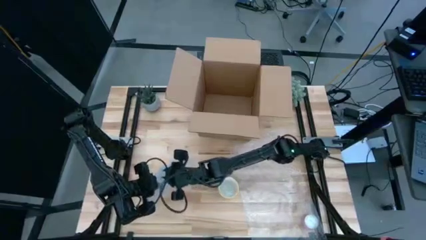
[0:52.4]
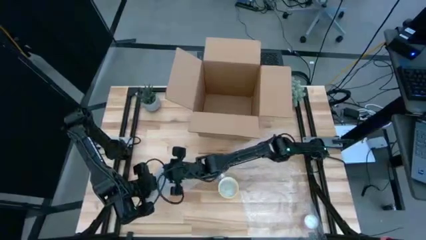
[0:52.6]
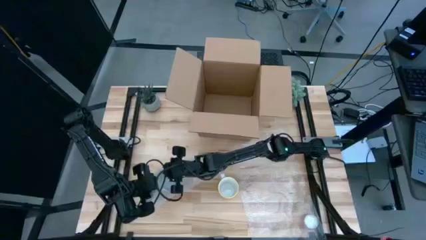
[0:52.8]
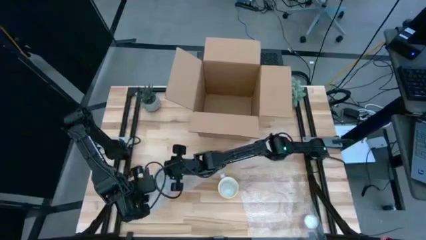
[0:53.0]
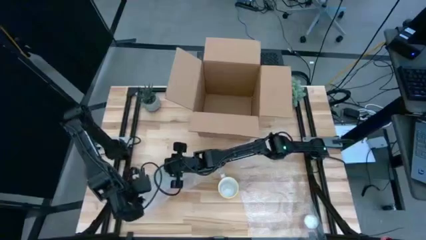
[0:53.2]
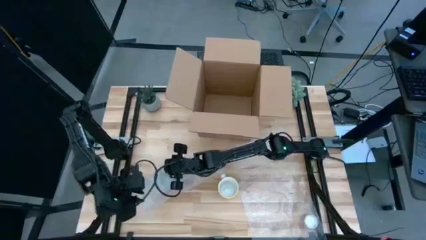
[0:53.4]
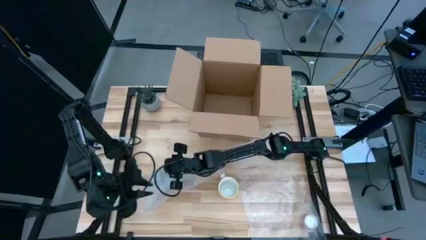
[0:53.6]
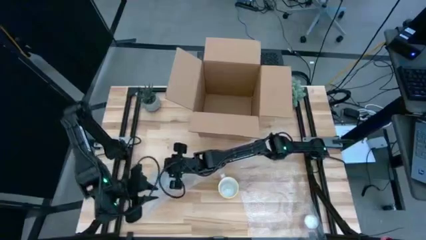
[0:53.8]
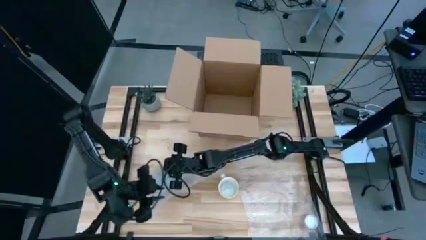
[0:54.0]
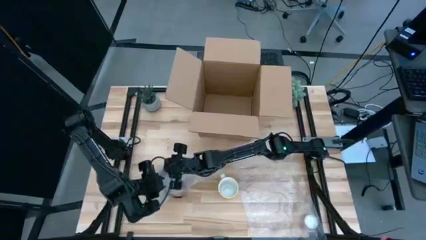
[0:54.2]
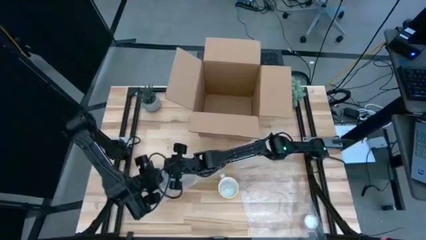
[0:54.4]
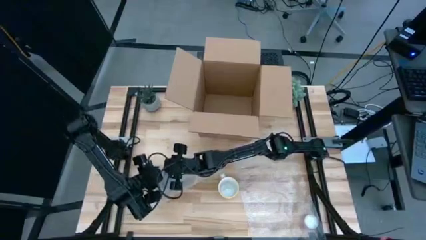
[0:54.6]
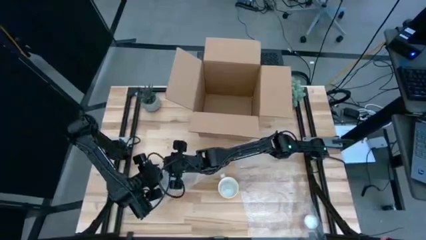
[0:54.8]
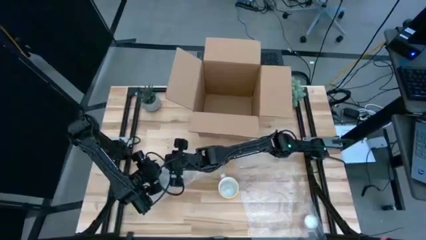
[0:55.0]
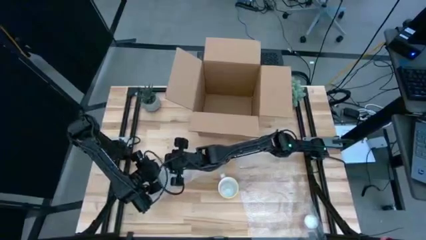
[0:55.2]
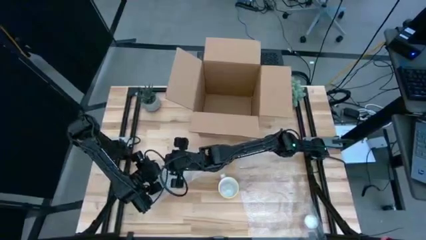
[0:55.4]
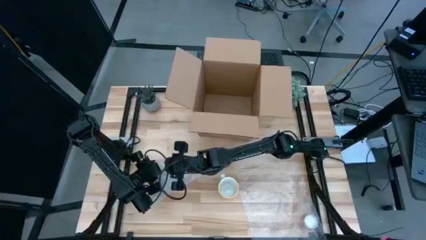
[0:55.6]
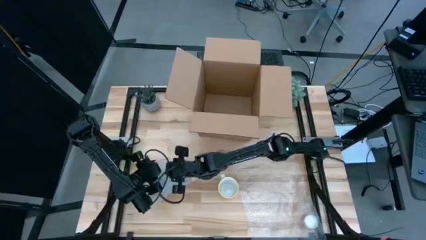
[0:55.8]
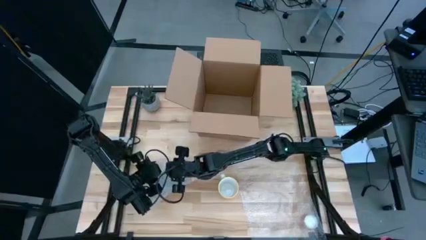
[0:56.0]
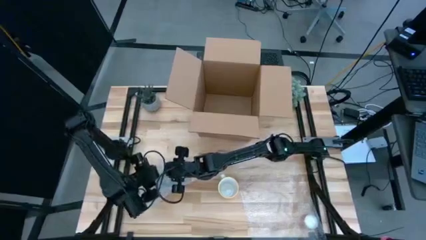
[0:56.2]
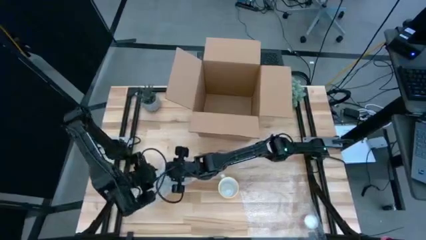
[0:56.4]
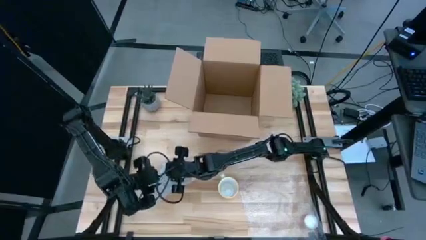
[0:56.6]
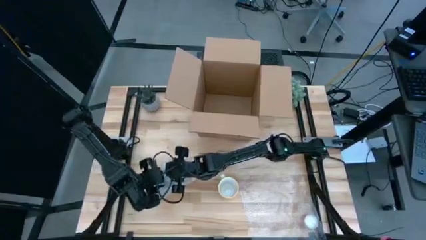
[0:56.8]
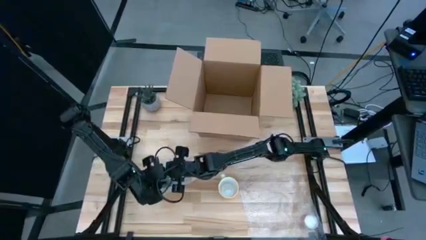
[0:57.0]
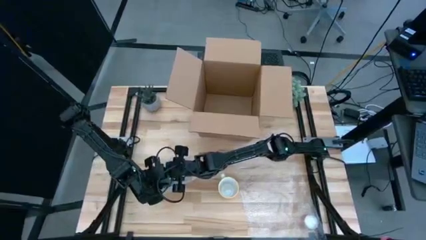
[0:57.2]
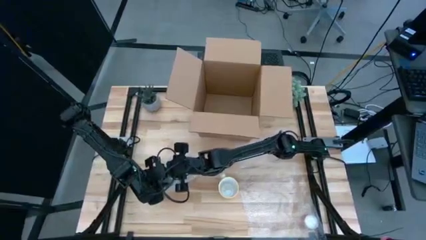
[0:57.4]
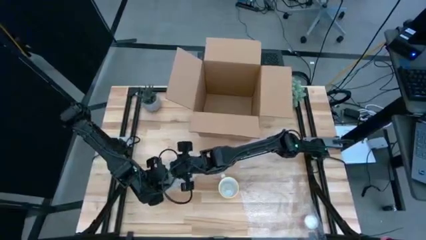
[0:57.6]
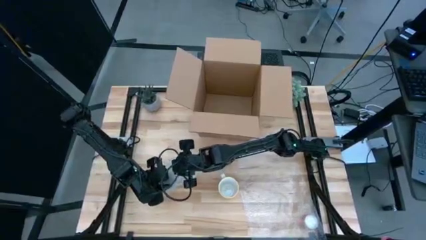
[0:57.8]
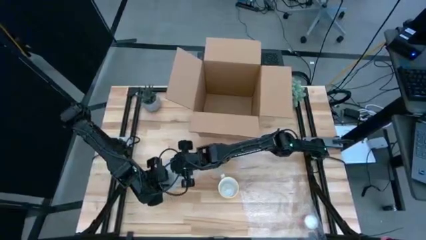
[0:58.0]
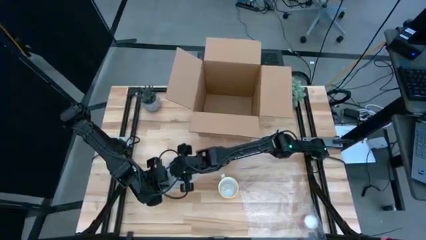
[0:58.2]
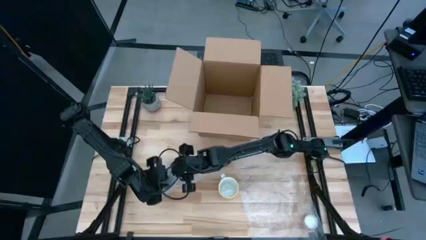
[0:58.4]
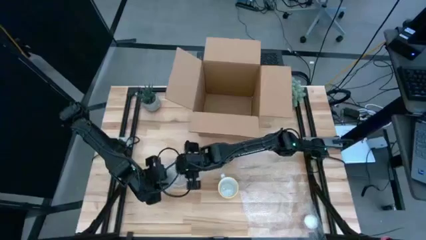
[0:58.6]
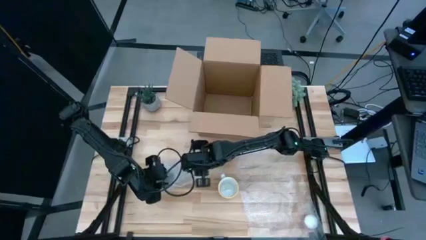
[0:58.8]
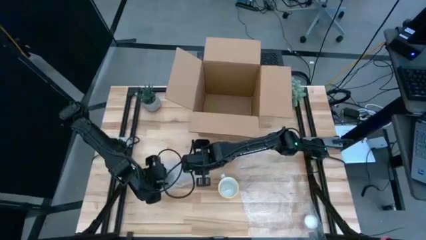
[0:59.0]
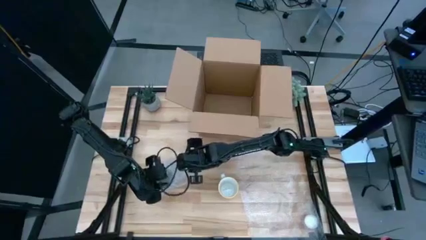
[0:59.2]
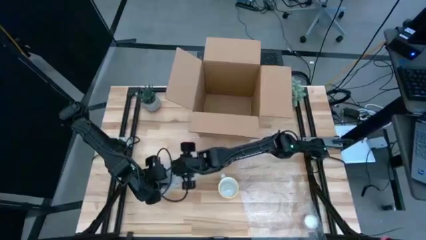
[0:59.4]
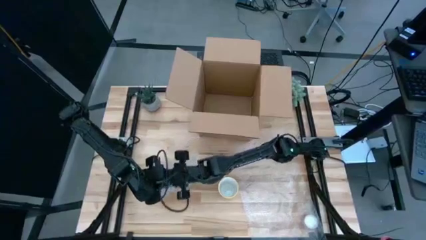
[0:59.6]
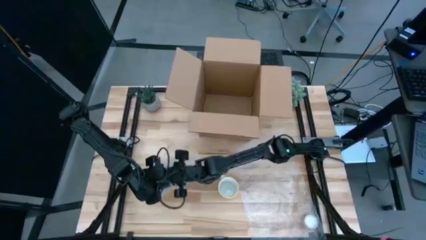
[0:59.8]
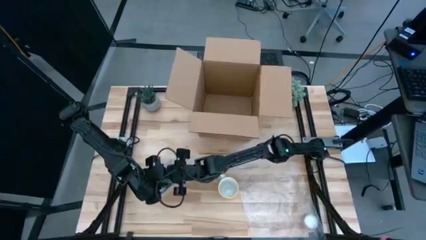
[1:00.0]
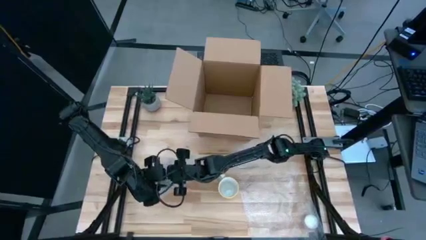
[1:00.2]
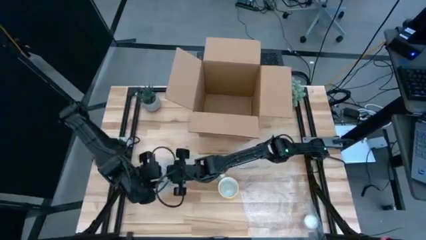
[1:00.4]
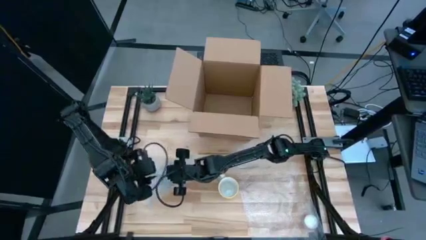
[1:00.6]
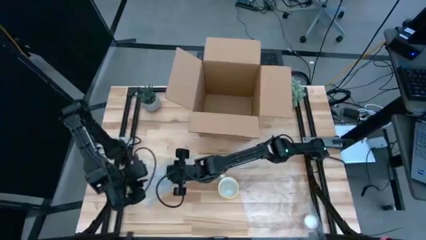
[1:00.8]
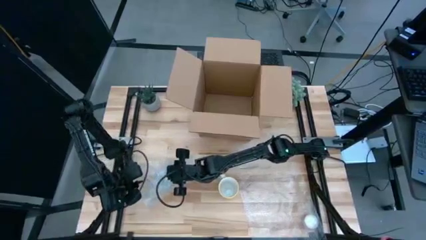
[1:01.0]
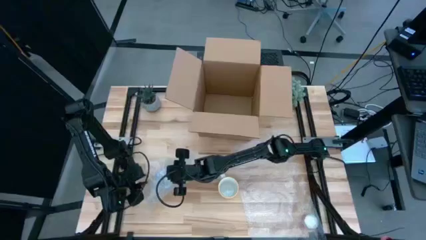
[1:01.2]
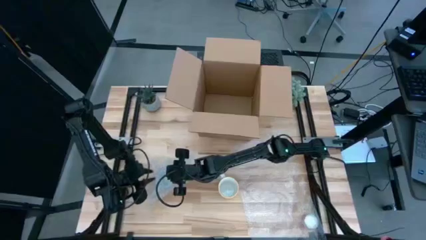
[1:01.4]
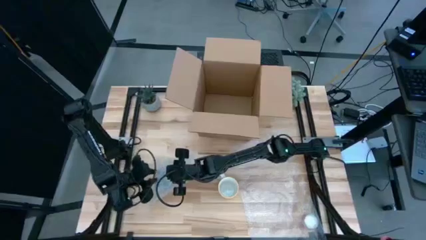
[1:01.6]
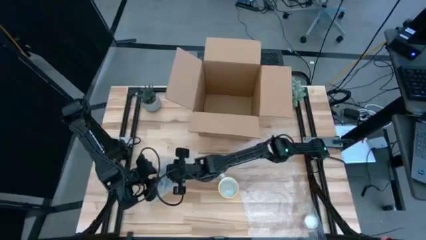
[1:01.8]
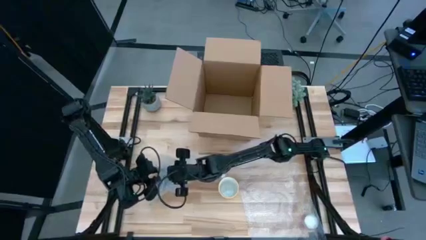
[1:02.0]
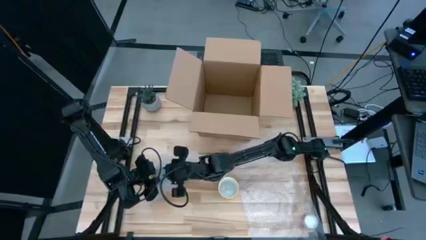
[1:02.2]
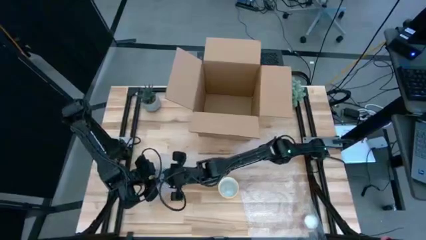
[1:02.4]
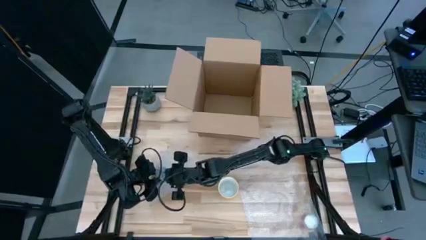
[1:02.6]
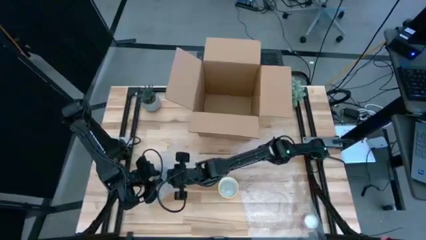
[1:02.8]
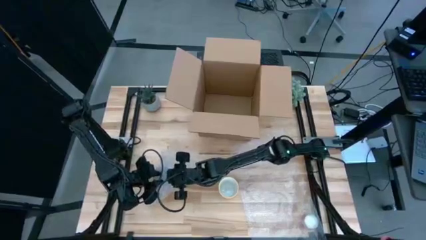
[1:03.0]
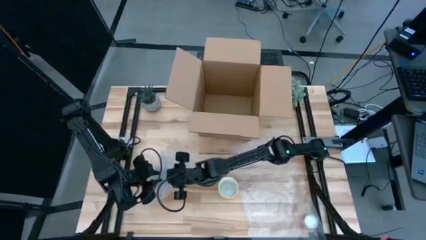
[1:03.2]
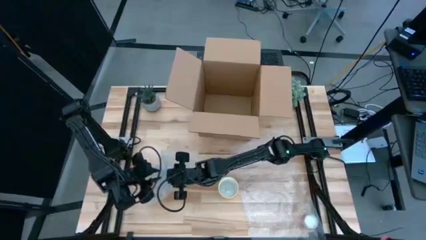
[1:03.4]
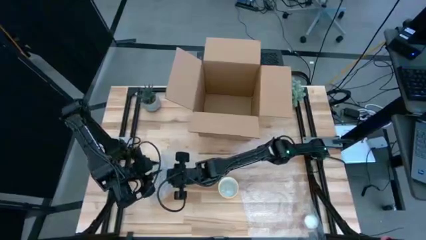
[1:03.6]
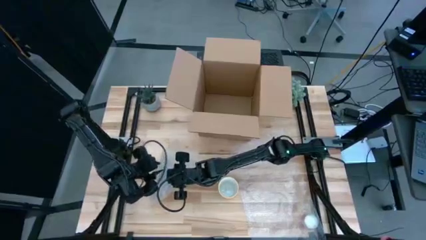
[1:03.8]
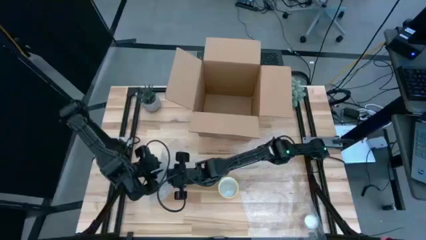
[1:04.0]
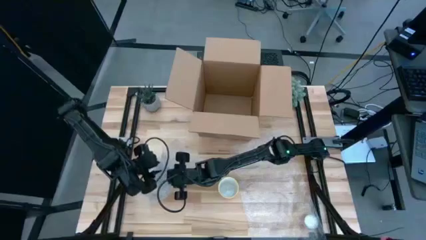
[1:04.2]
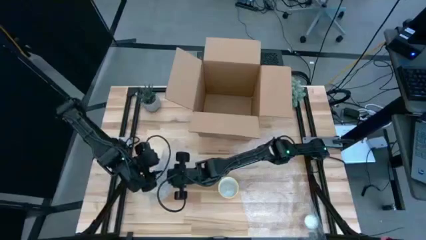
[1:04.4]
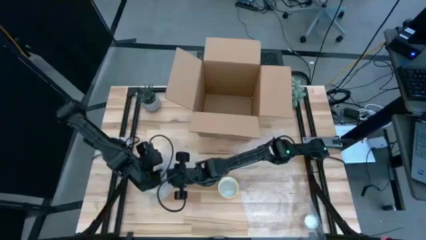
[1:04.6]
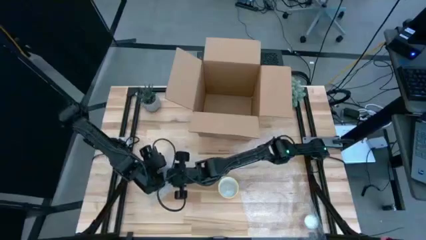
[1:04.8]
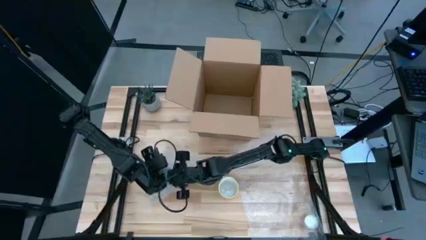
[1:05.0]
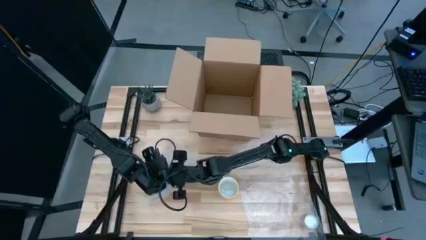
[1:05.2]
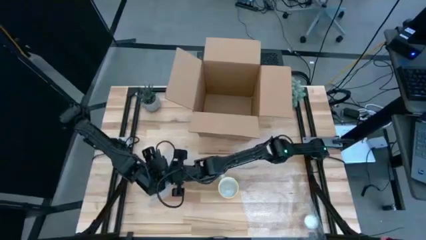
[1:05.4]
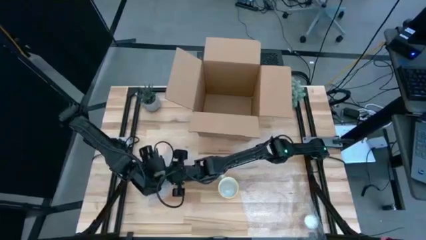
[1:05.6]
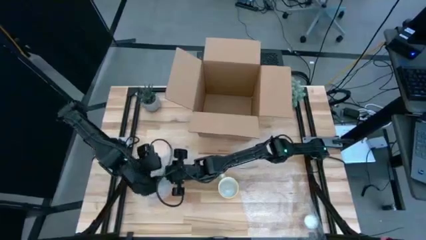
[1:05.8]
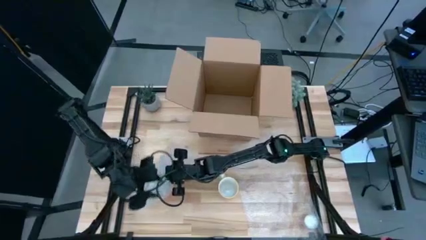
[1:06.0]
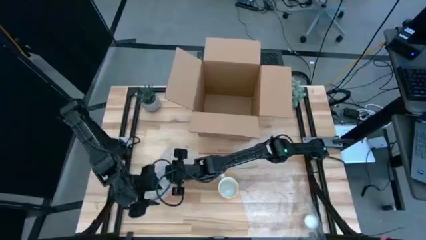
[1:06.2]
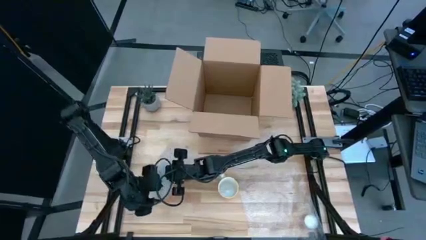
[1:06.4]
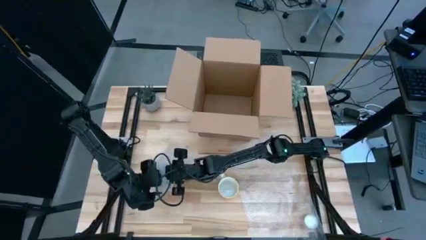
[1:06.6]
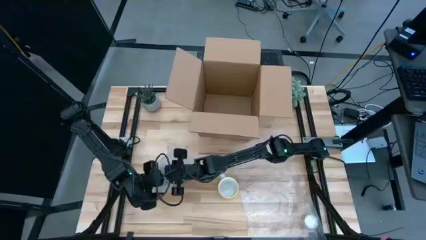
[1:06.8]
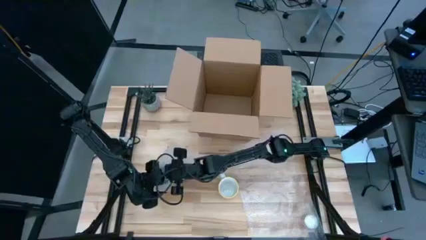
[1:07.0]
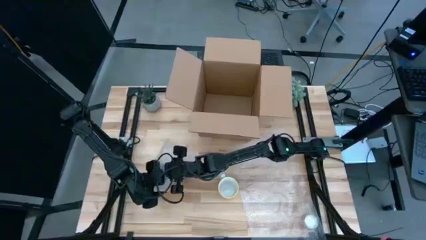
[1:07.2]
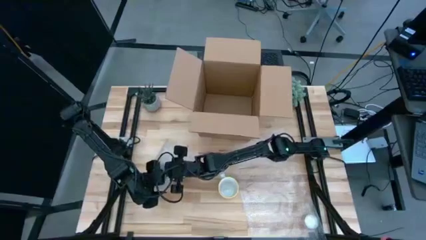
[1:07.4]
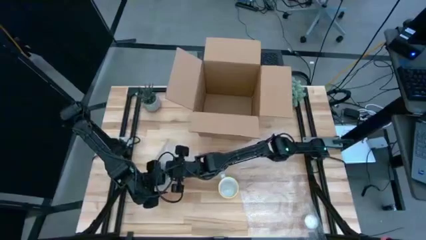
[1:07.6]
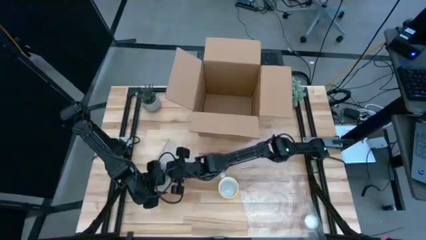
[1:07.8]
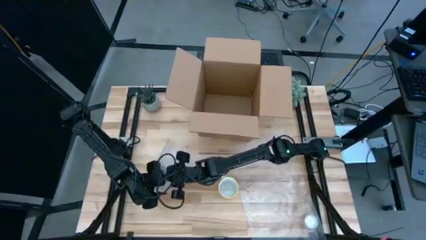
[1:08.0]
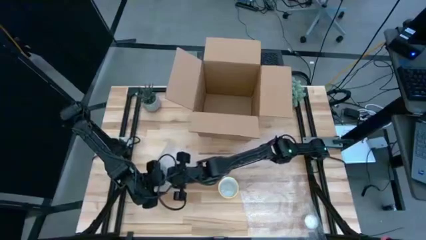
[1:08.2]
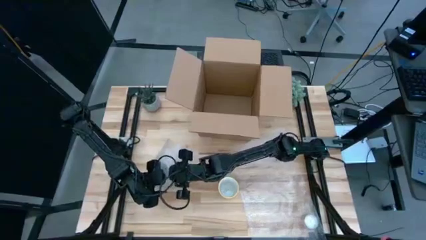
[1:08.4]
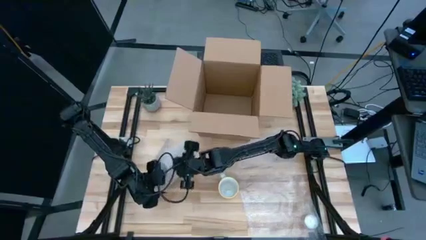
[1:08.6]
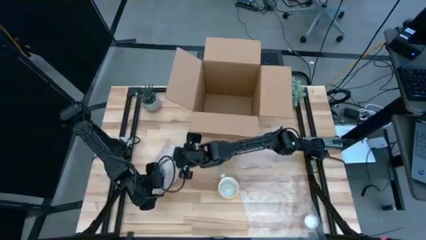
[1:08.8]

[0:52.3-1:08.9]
Task: wrap mug
Wrap the red mug with the bubble wrap
